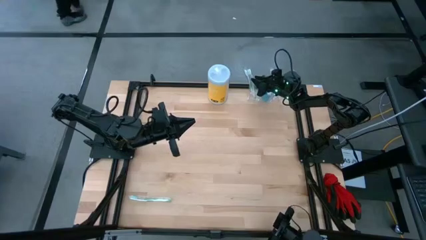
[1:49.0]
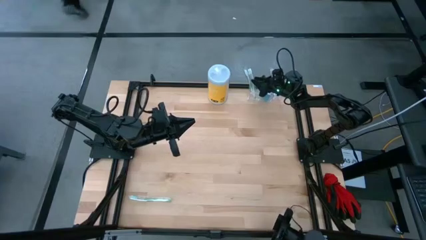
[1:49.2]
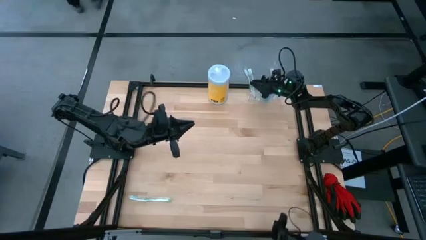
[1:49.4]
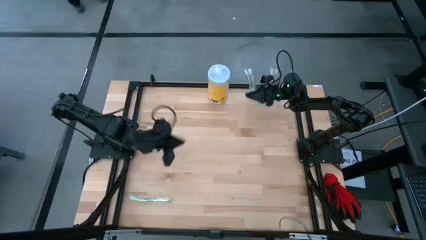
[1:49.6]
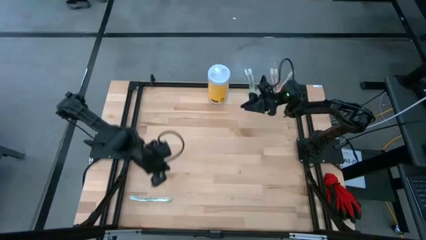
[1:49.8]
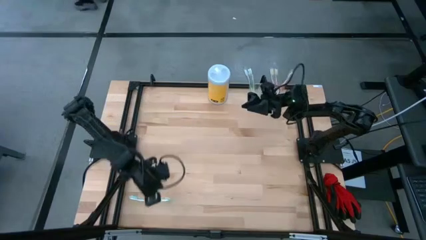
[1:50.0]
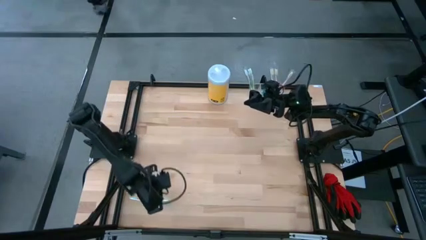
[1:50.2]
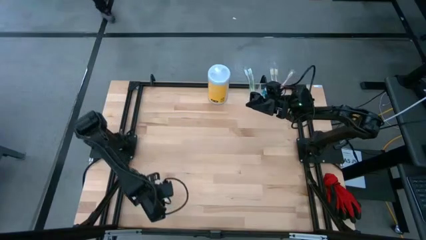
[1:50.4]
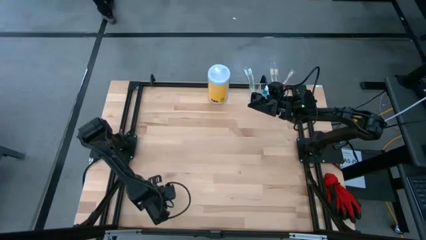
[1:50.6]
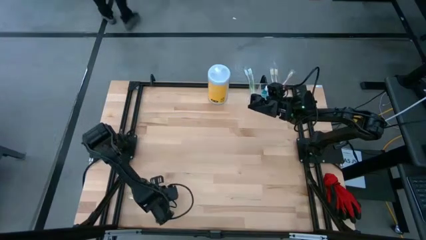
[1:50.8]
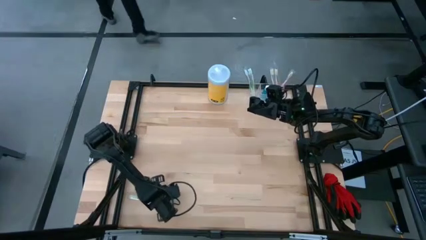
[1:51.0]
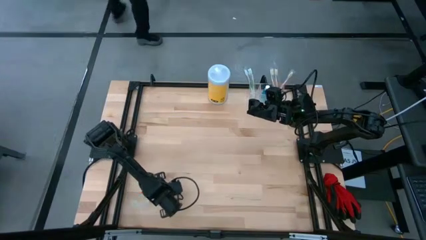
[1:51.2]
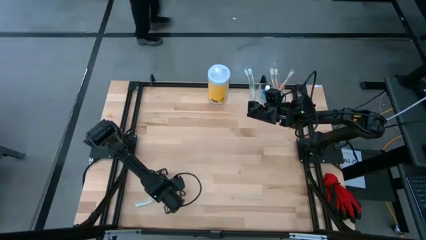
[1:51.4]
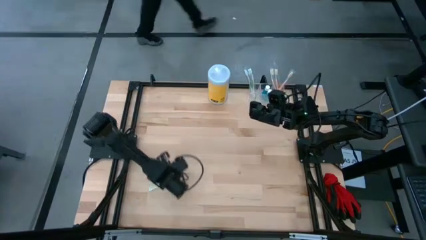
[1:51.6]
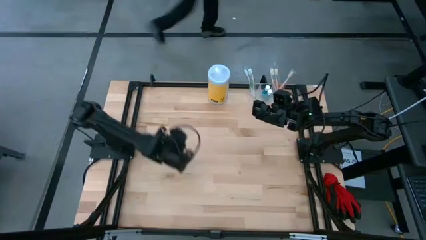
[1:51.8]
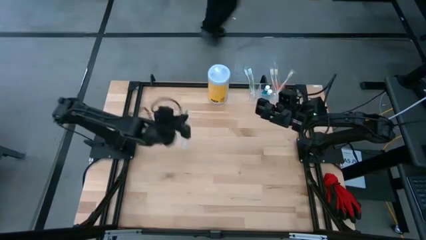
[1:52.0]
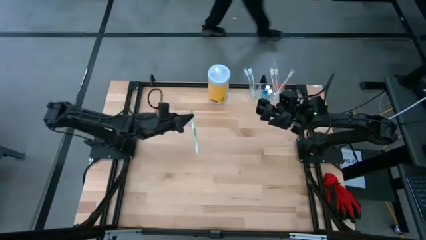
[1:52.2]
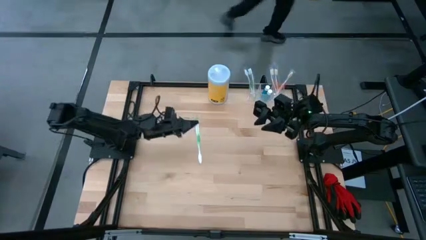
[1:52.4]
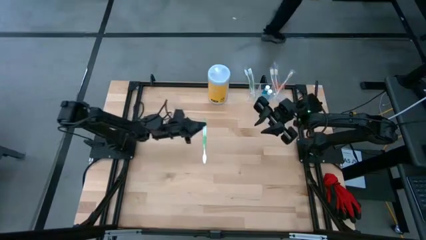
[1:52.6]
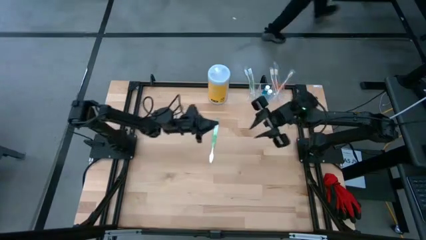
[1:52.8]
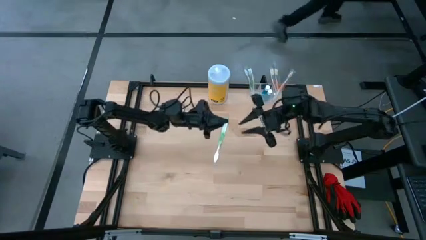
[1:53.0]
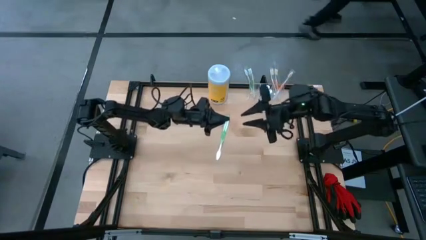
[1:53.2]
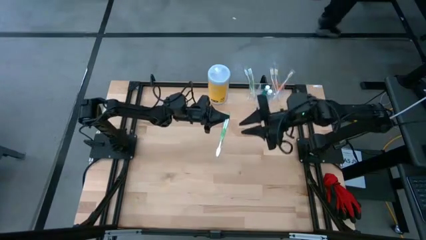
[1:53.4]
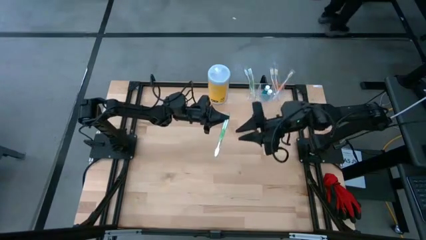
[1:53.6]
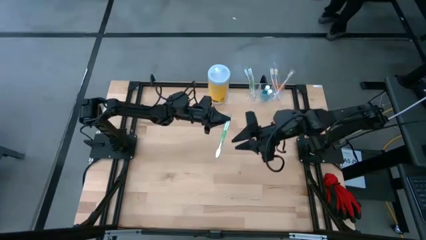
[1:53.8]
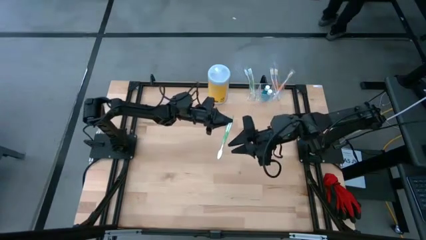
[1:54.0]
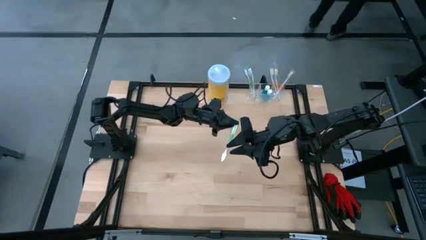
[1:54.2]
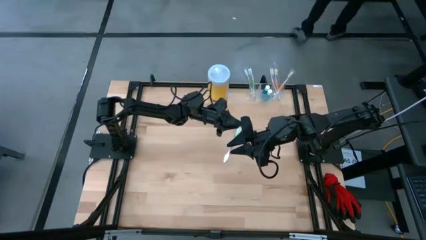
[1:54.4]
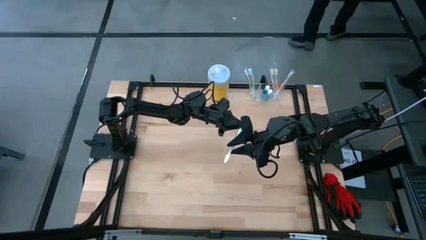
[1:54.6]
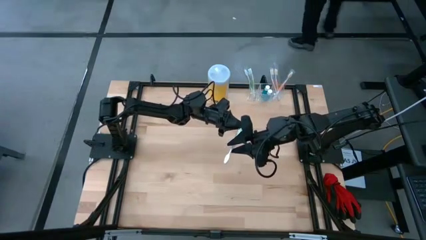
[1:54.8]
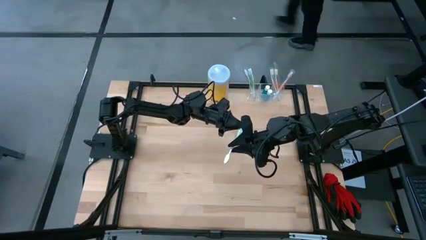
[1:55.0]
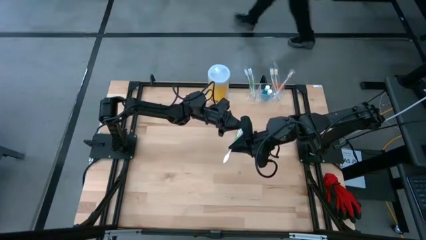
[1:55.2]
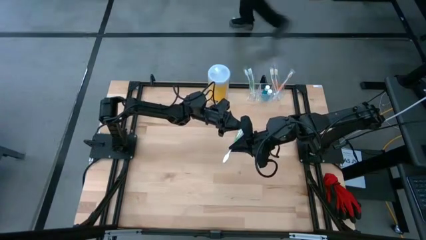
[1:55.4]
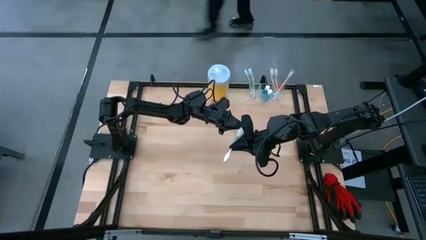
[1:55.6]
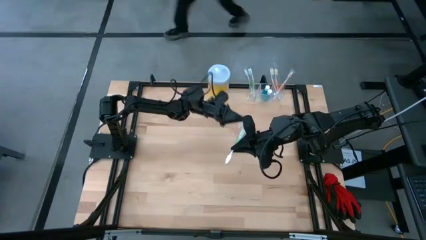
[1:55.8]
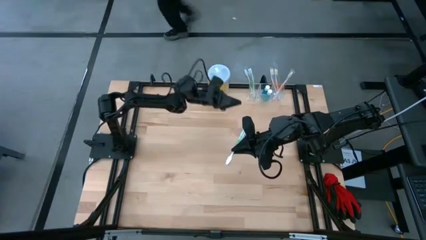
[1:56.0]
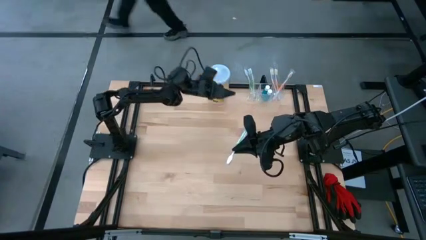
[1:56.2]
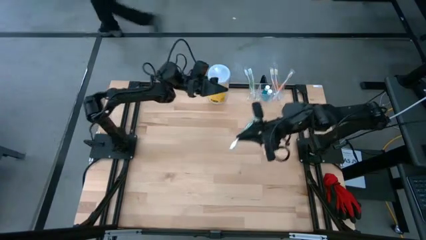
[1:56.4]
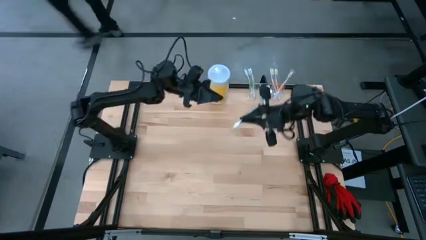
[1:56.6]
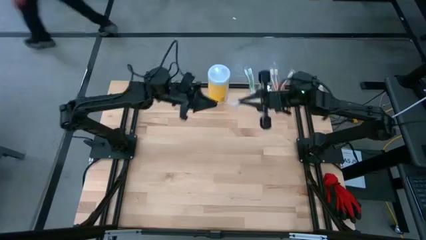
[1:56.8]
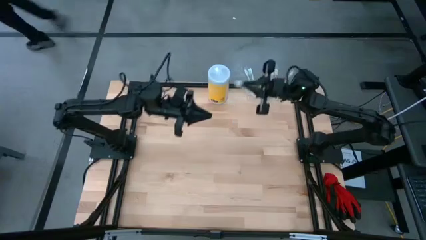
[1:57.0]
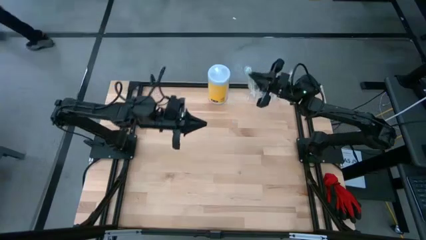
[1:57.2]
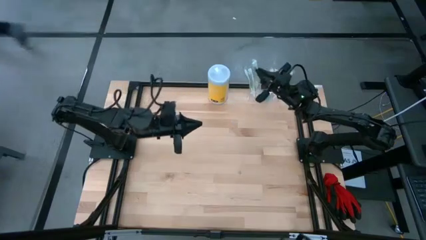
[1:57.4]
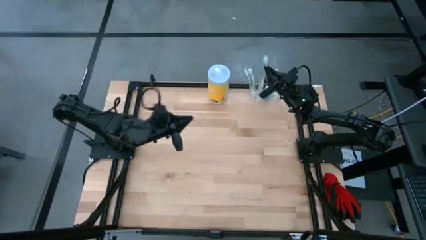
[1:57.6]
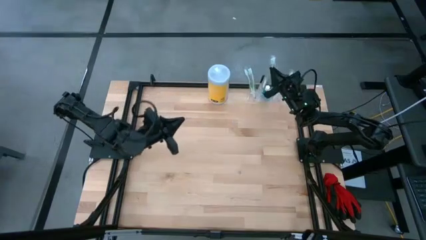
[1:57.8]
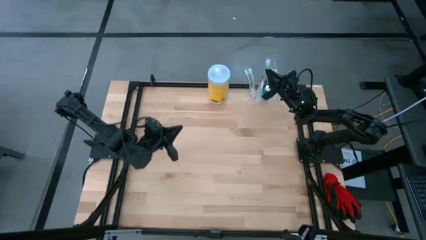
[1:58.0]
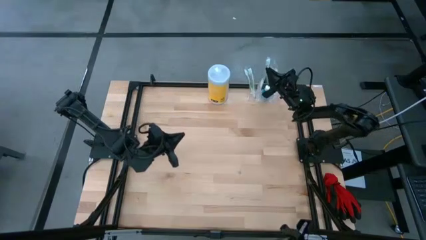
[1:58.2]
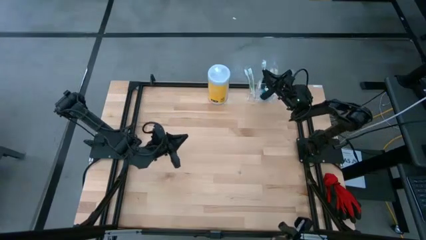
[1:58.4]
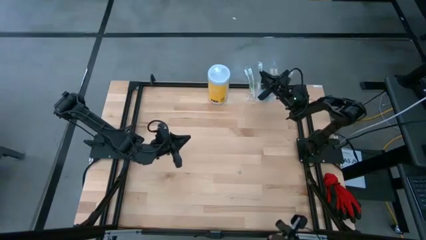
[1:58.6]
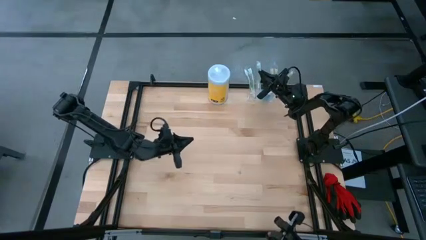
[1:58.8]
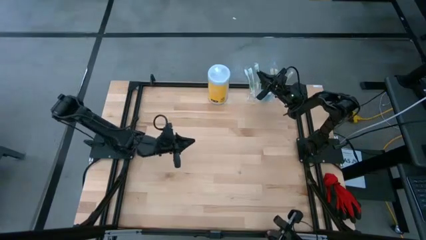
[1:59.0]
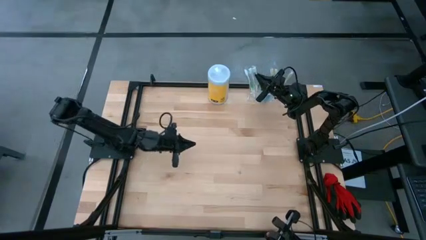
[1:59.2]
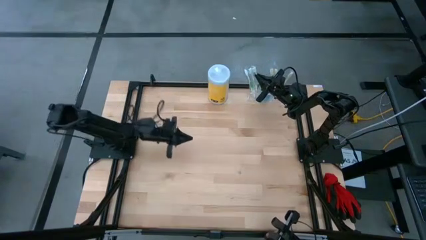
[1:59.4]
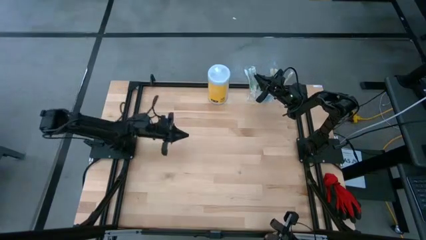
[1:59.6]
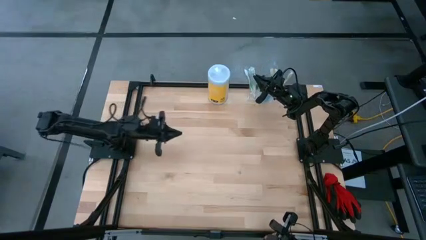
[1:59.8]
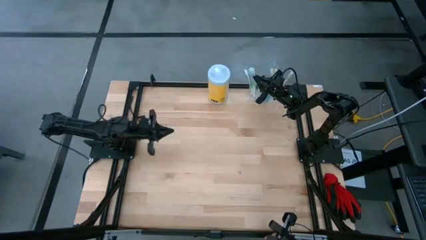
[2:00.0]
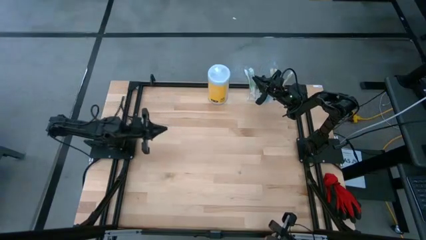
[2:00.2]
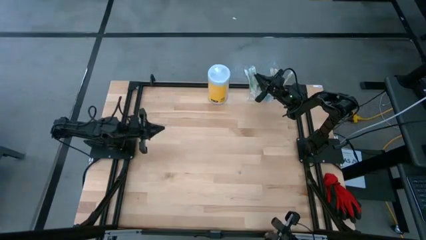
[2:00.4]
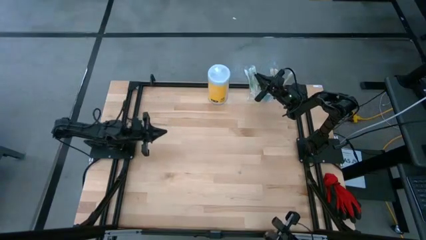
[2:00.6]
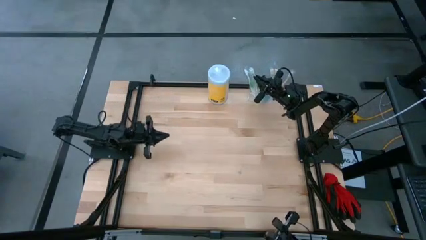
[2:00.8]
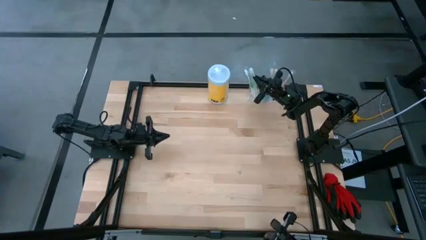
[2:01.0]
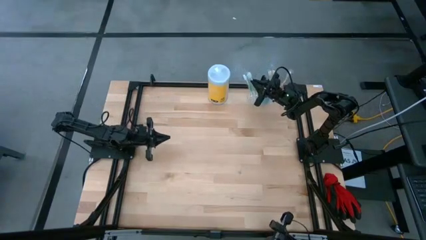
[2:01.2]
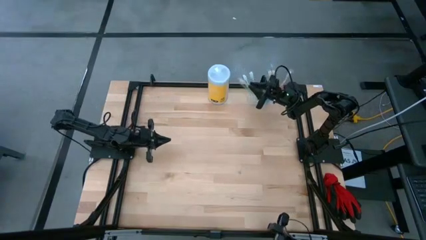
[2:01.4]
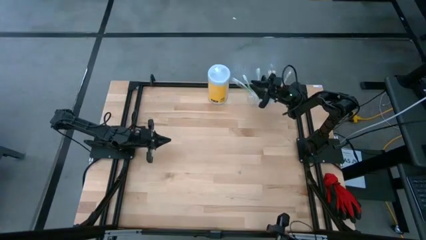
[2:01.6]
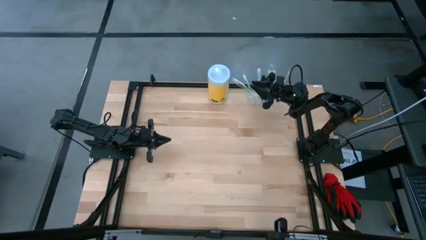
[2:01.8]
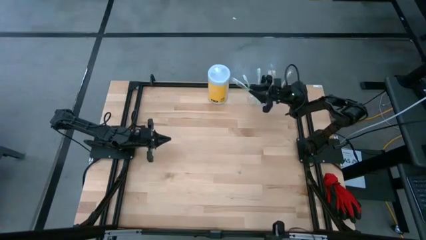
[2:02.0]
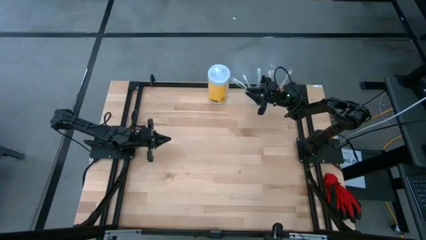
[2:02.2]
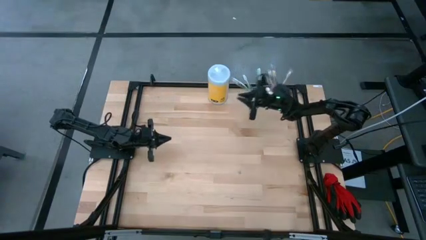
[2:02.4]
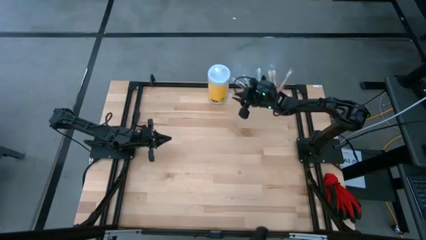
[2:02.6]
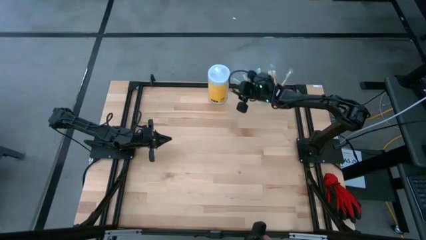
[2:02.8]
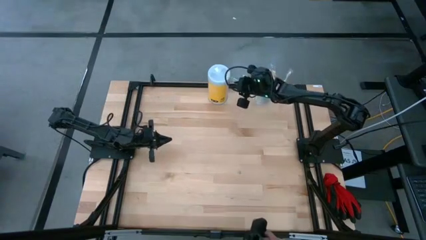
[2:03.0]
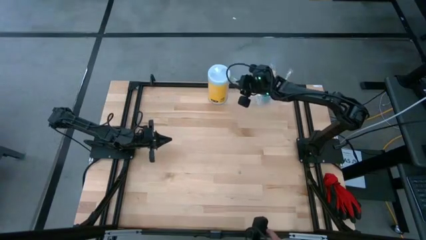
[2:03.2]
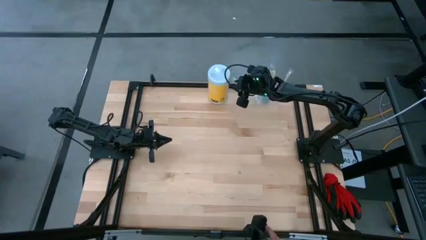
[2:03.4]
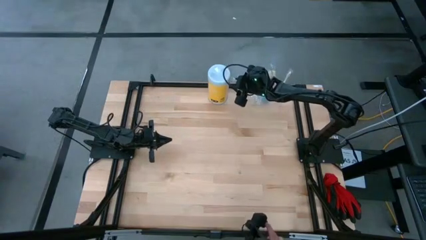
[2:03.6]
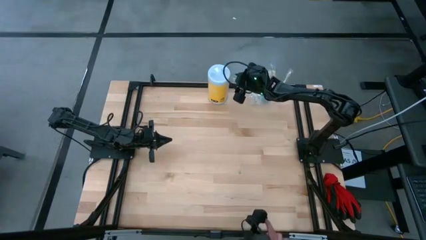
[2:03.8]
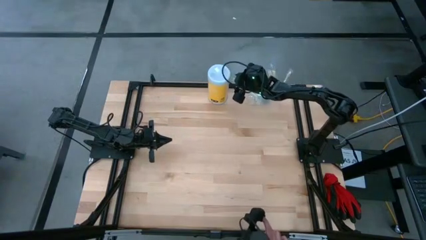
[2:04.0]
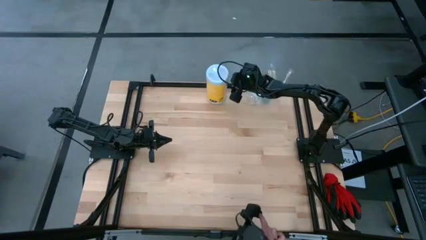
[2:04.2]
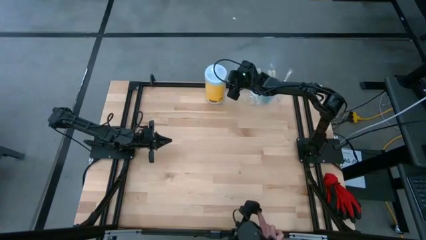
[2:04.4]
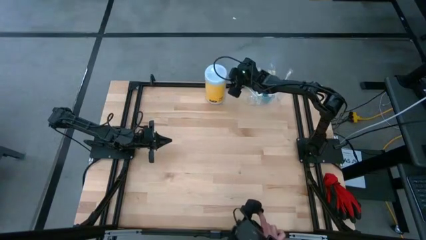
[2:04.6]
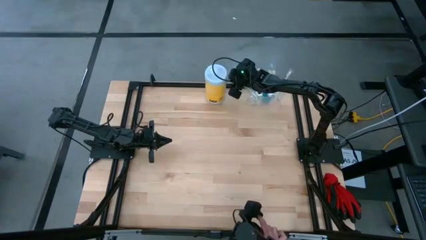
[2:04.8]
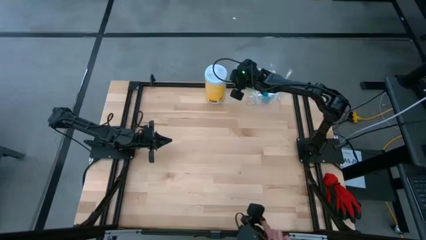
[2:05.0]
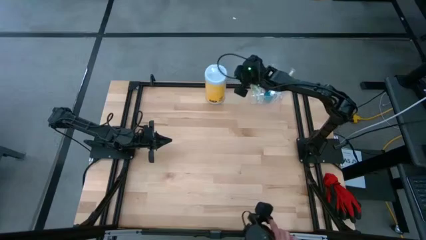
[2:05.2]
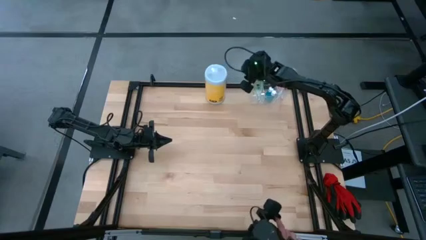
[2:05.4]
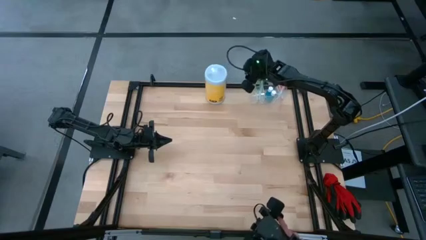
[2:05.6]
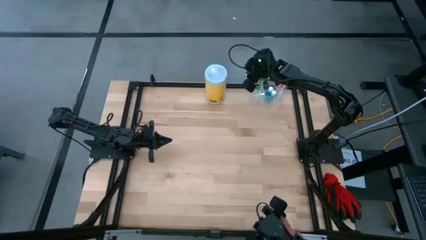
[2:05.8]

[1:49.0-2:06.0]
Task: Pick & Place toothbrushing station
Put the green toothbrush into the transparent organizer

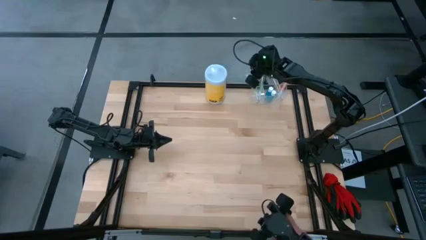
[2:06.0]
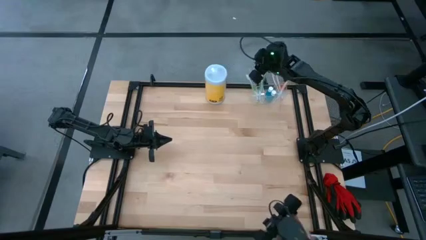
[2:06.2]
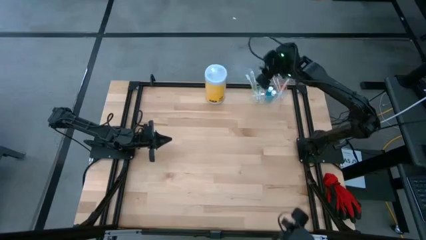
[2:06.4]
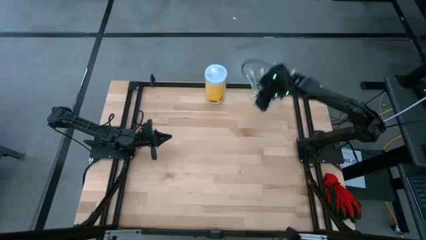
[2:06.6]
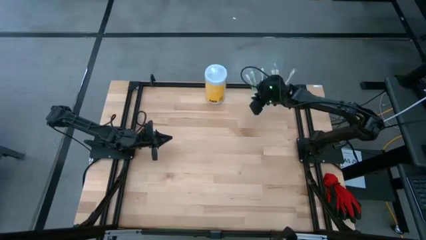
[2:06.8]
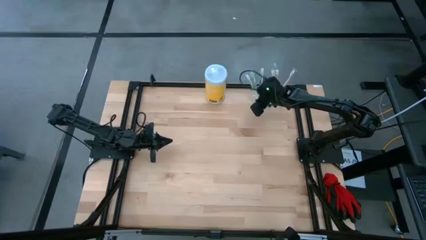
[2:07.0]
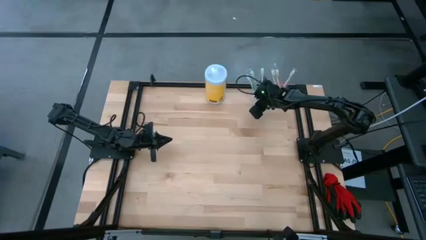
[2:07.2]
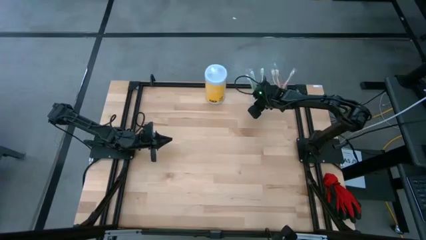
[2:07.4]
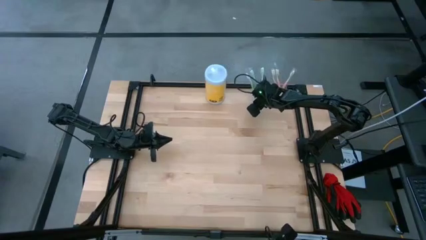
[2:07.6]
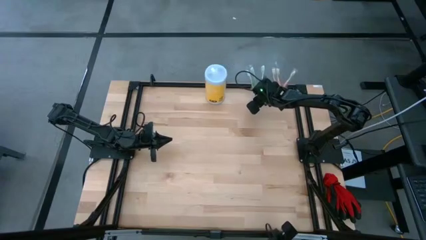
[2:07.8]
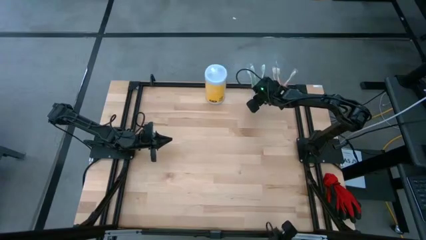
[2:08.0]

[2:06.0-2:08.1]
Adjust the transparent organizer
